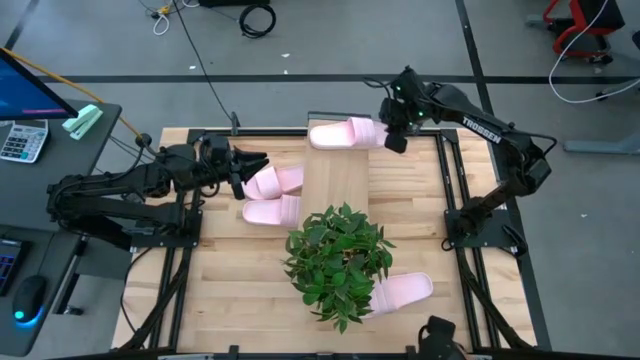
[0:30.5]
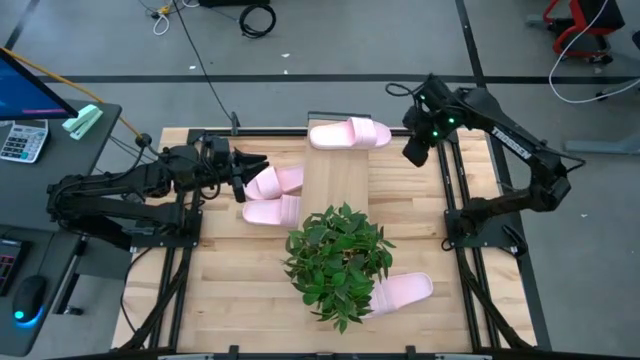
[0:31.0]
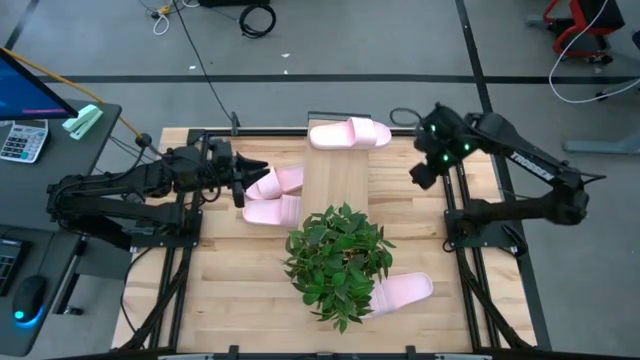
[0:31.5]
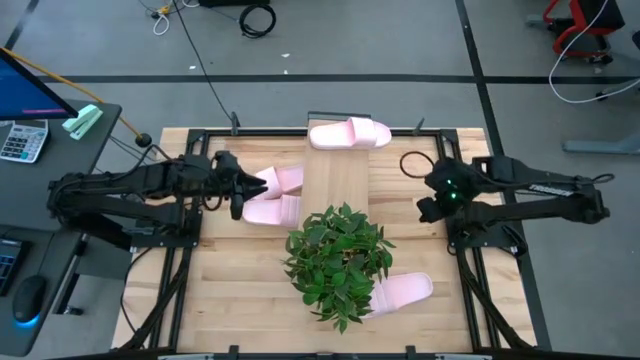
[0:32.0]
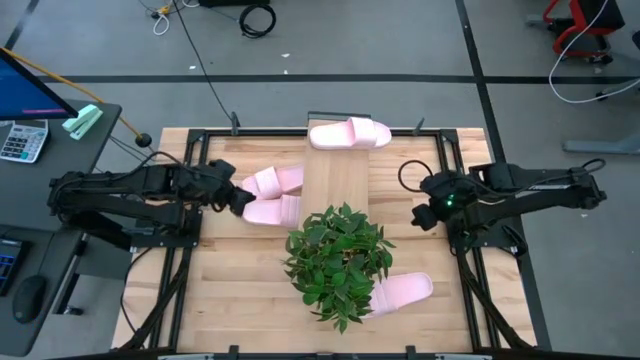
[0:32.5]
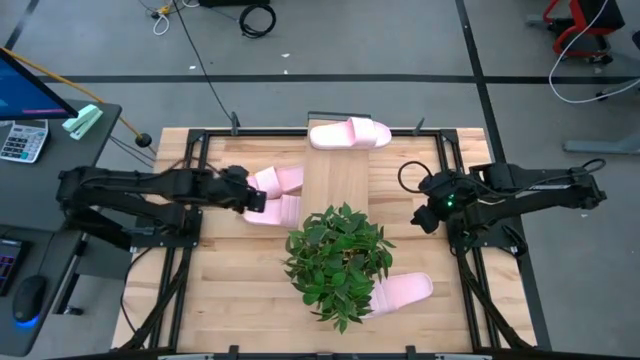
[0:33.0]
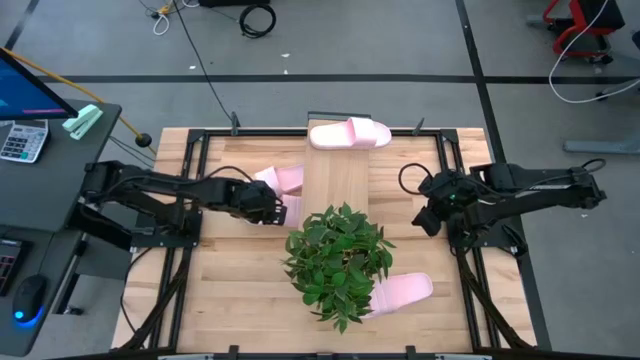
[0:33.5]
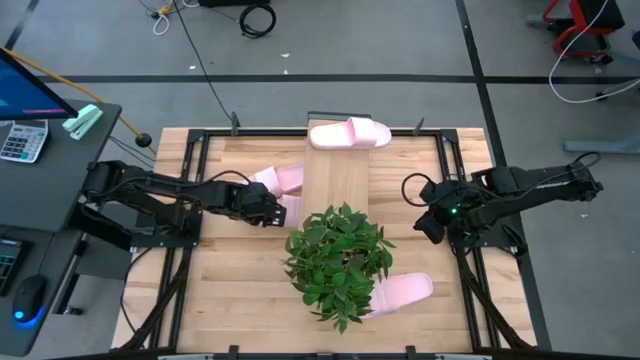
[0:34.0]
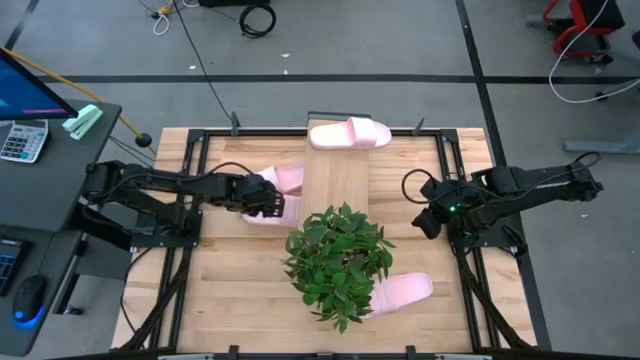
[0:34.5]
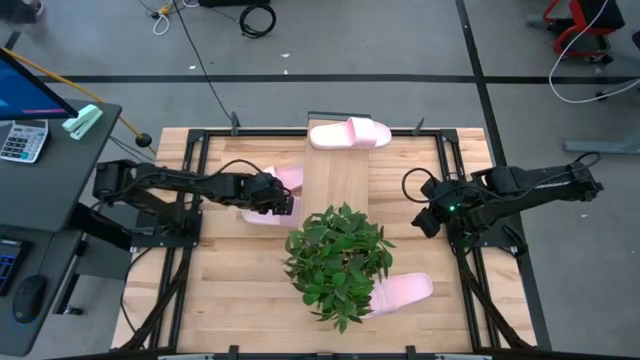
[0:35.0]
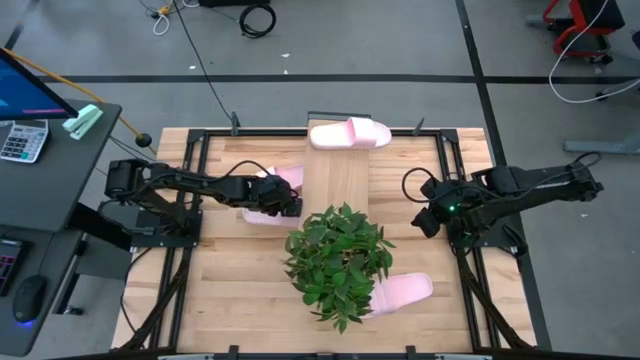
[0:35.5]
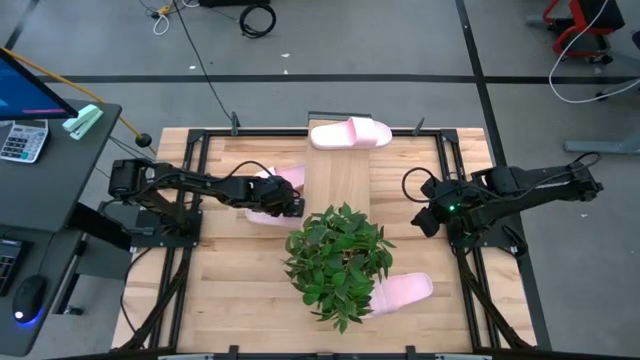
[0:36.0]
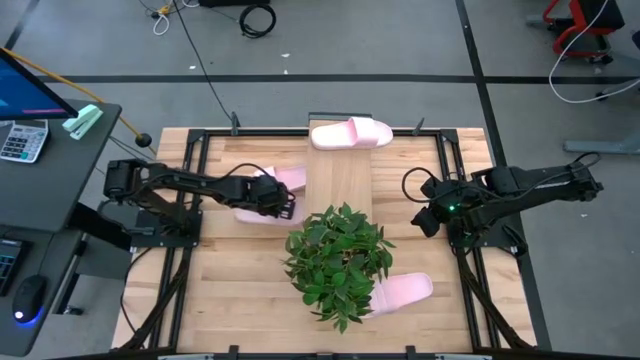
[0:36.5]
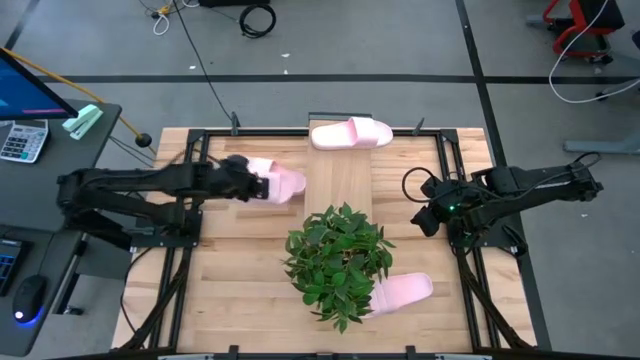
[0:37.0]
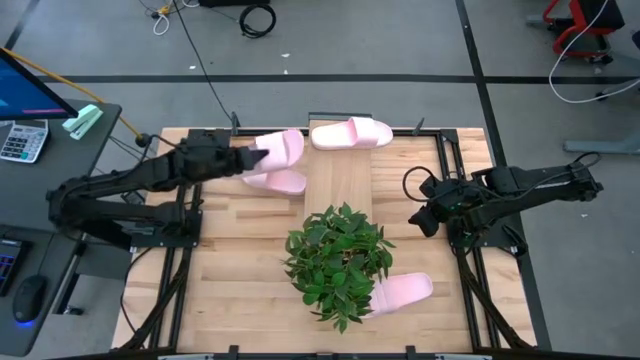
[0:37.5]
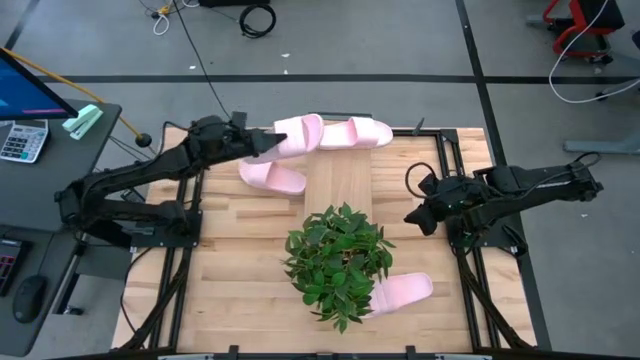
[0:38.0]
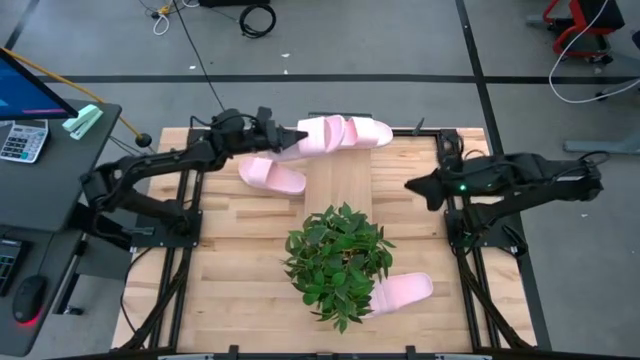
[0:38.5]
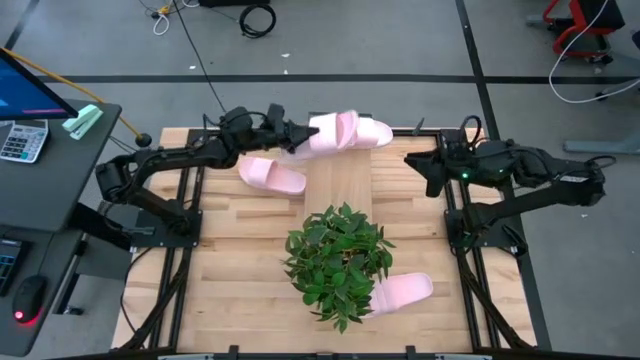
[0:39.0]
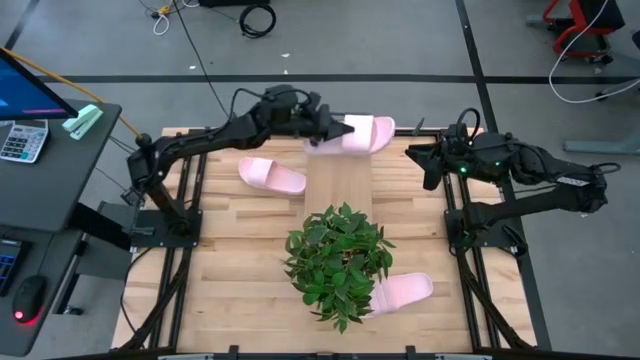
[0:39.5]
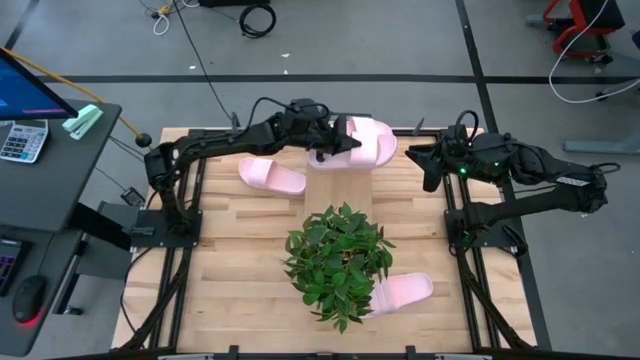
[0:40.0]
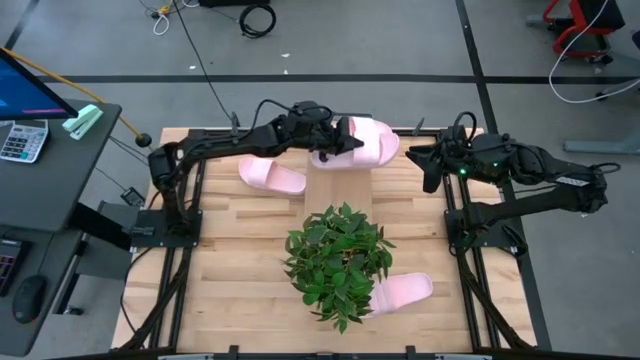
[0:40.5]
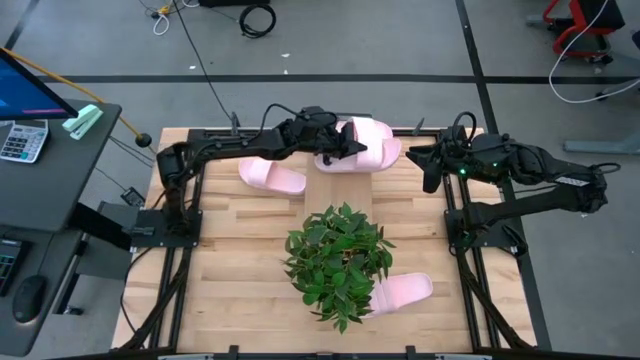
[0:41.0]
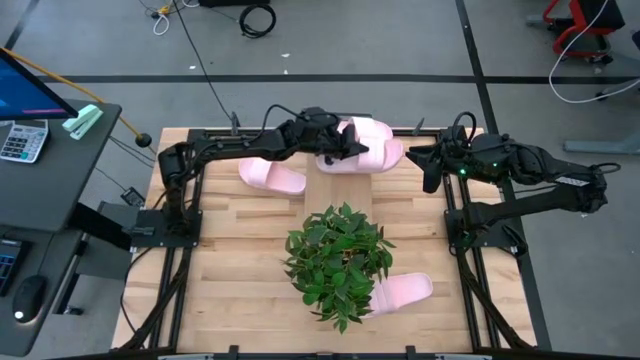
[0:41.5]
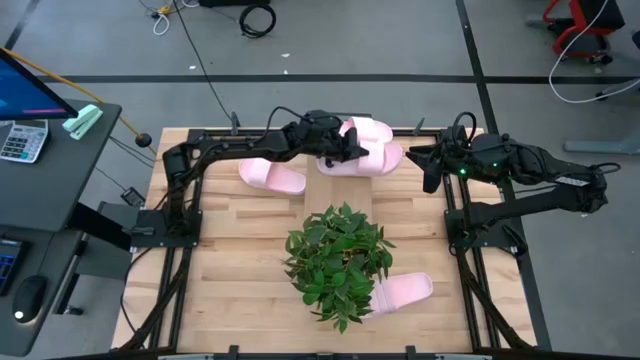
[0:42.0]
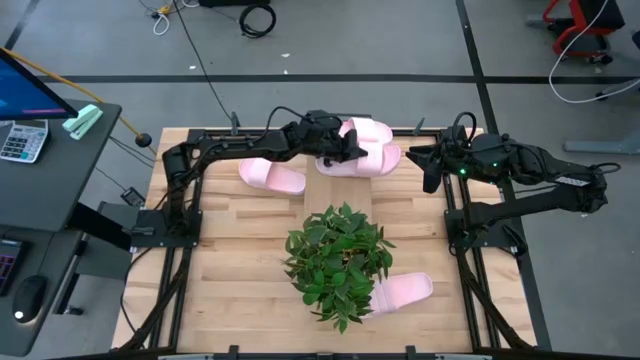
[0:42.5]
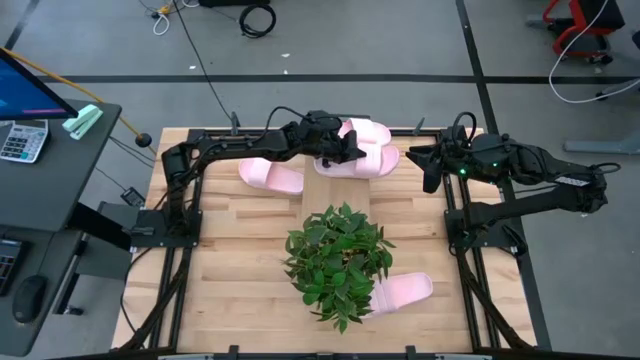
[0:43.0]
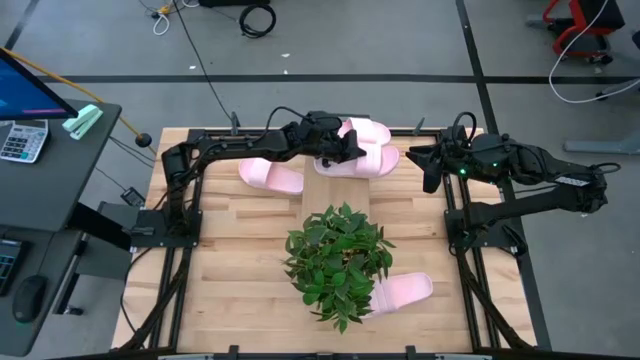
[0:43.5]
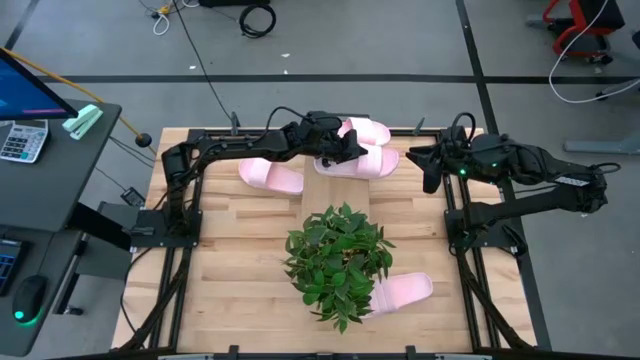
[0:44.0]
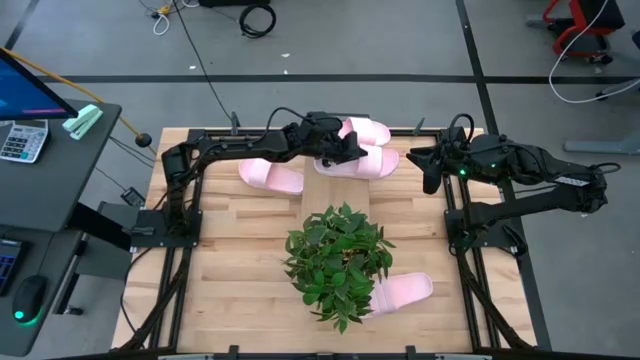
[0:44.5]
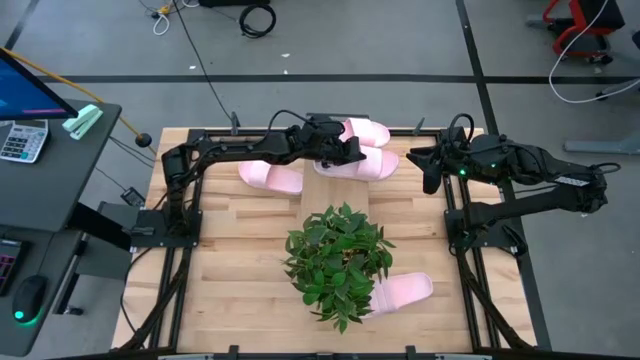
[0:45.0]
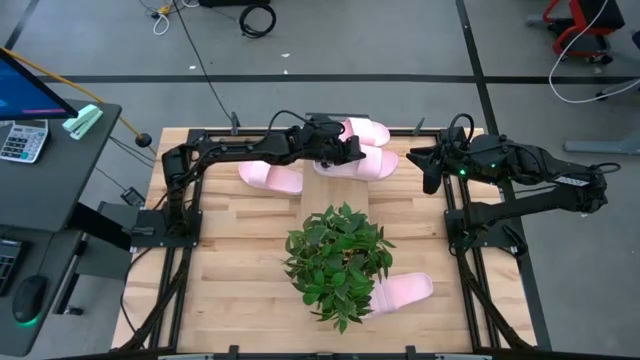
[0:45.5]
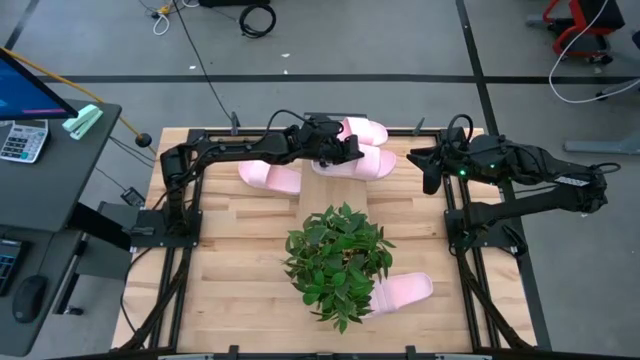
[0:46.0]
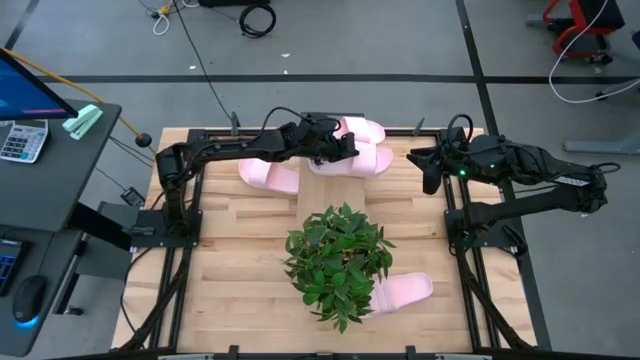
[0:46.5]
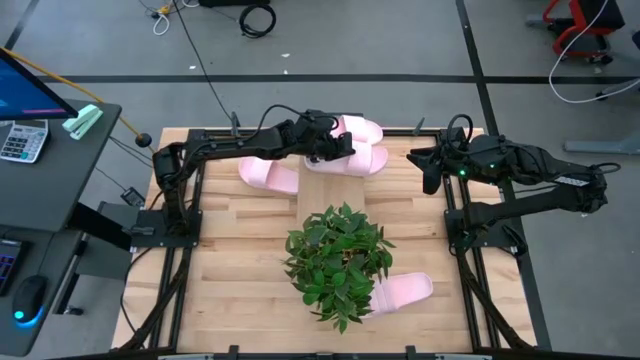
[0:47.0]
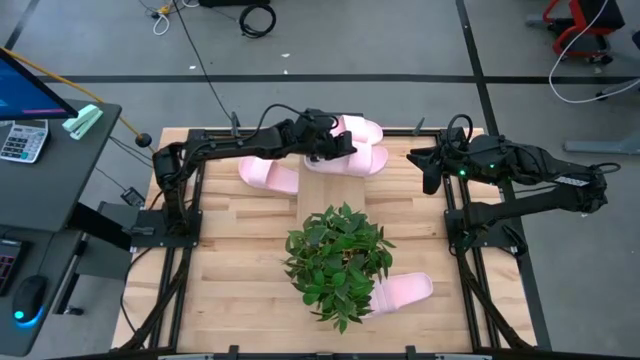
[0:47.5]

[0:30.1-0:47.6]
Task: Pick and place slides into the shelf
Put the pink slide on the shelf
